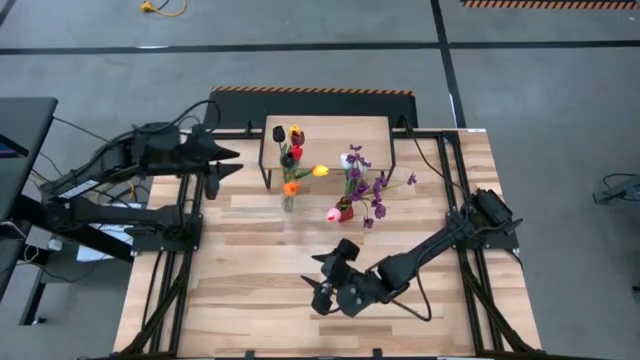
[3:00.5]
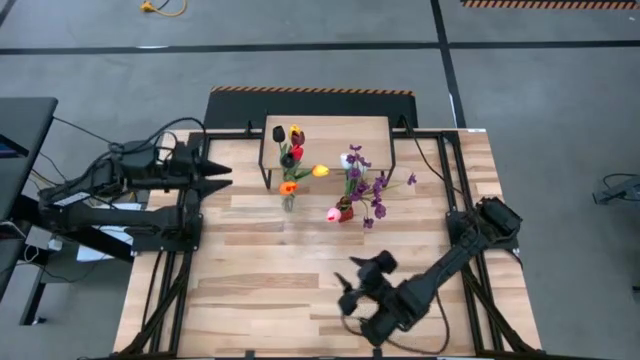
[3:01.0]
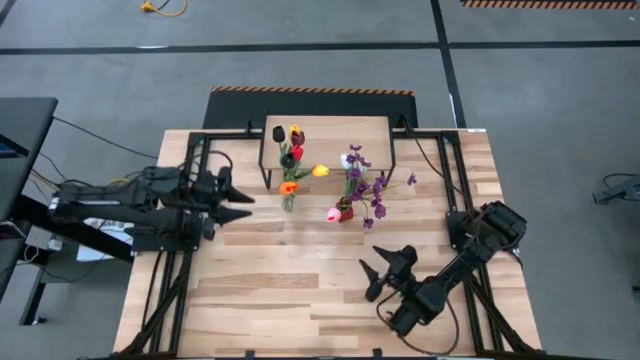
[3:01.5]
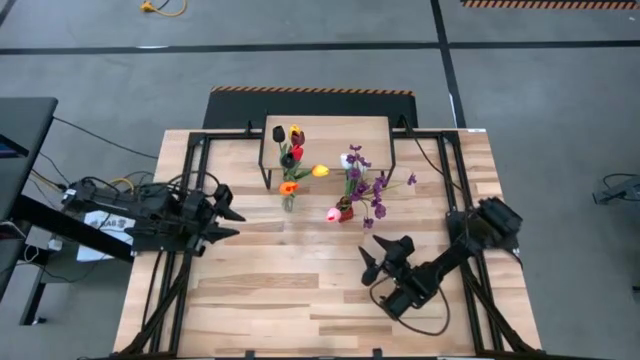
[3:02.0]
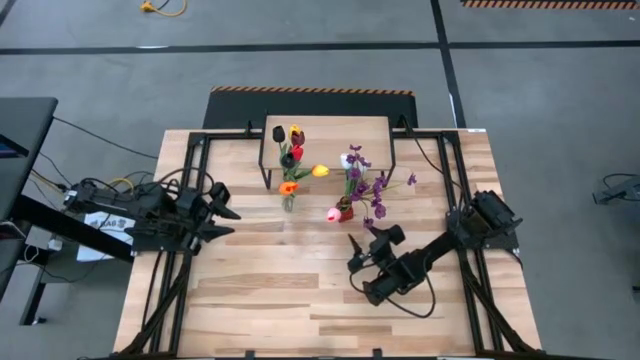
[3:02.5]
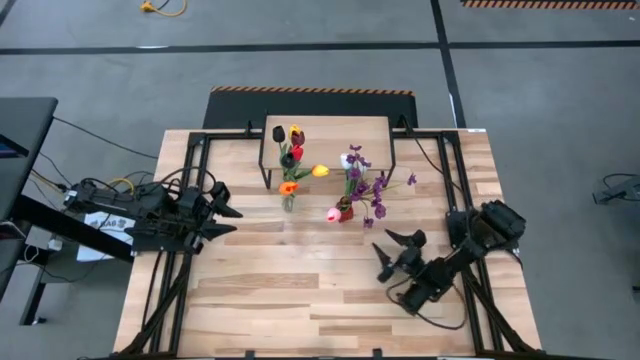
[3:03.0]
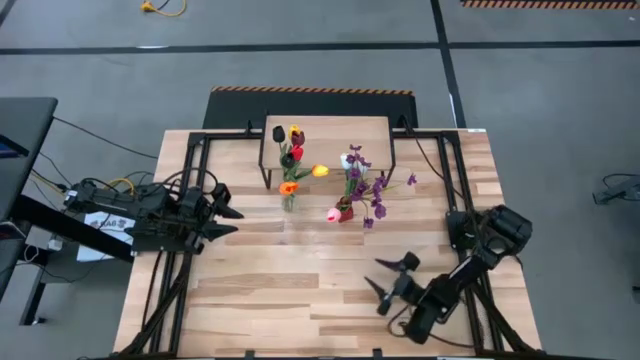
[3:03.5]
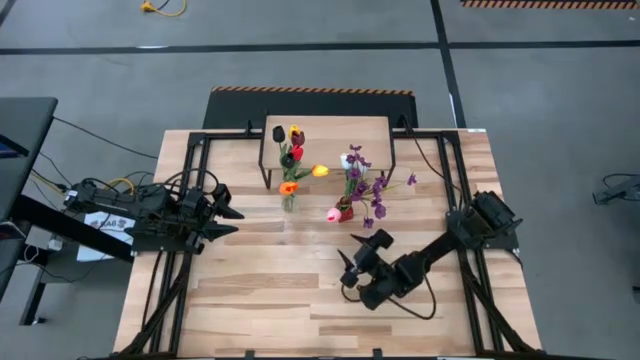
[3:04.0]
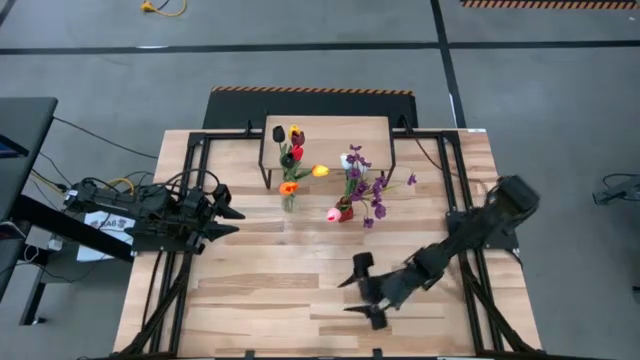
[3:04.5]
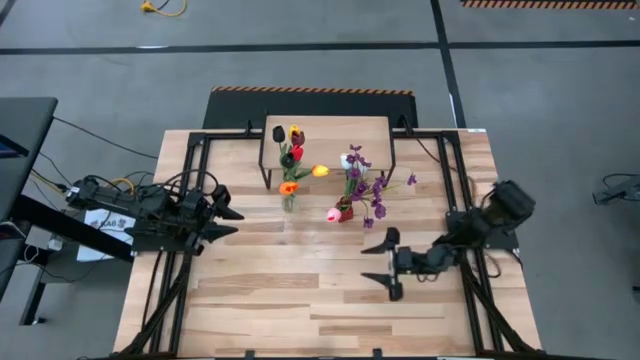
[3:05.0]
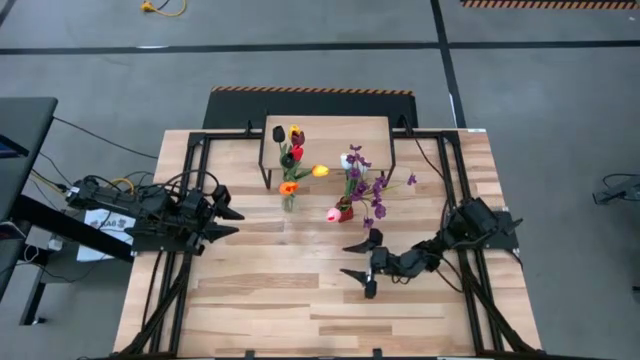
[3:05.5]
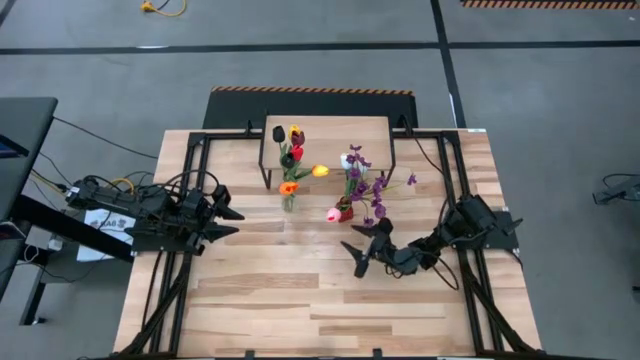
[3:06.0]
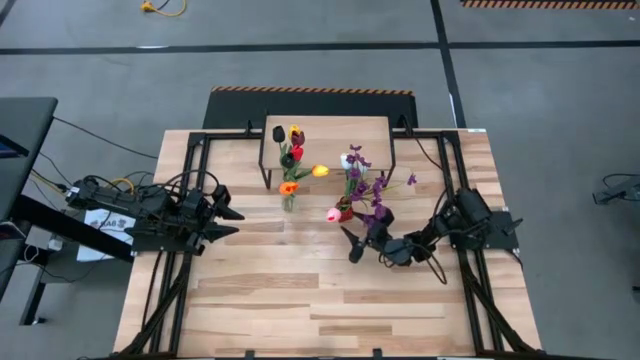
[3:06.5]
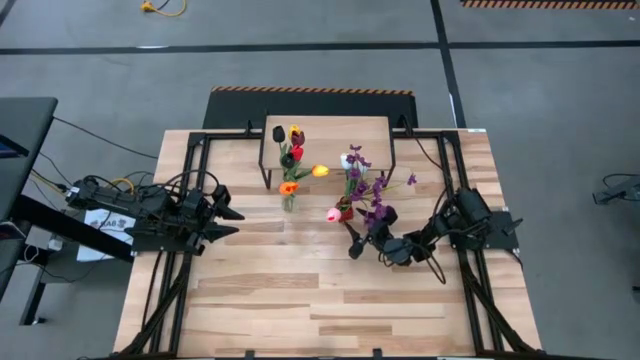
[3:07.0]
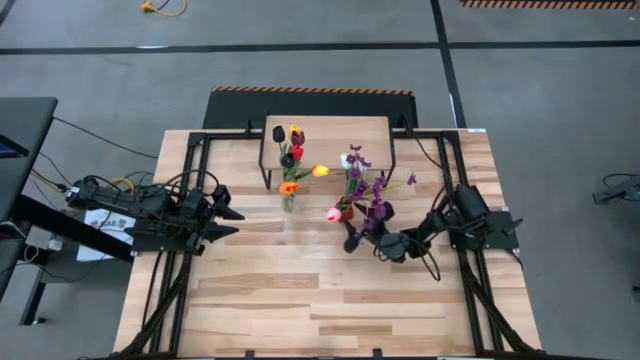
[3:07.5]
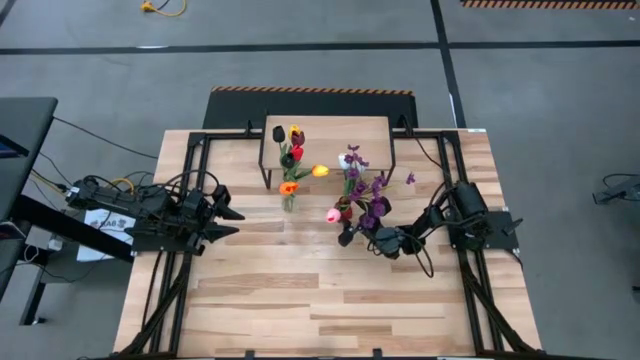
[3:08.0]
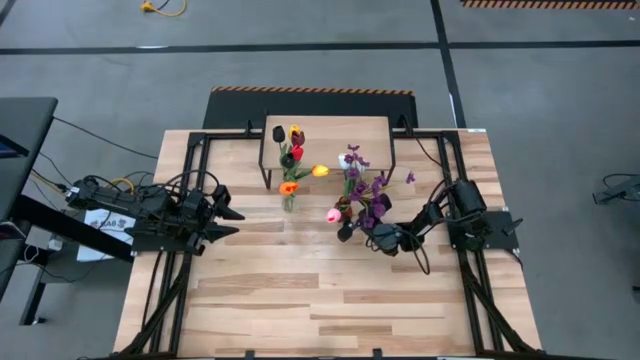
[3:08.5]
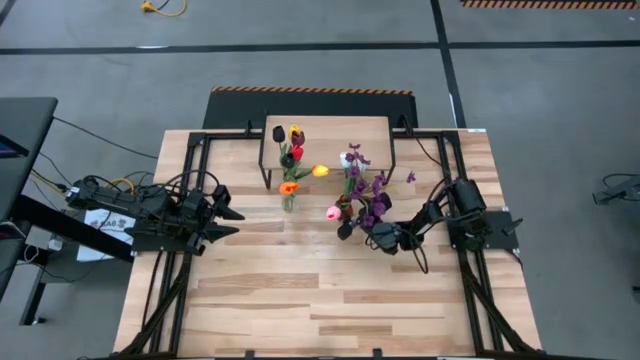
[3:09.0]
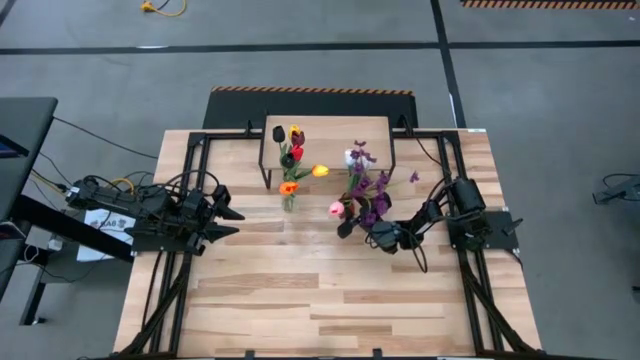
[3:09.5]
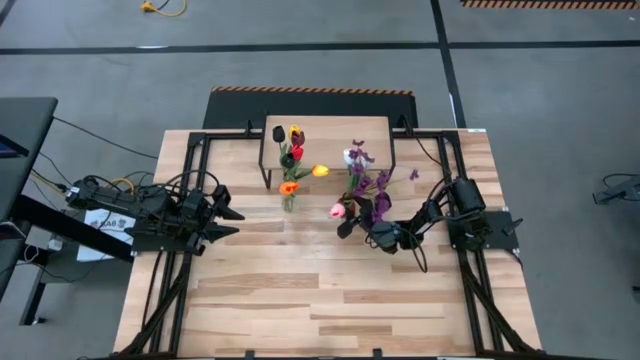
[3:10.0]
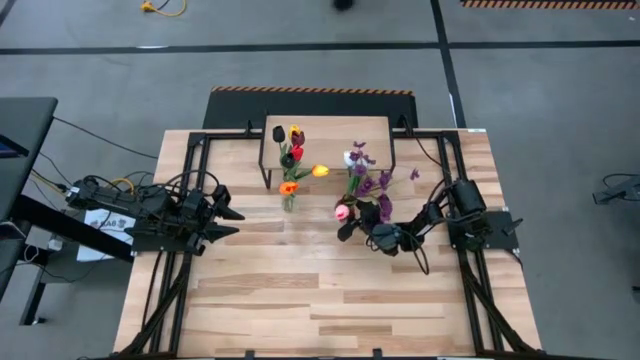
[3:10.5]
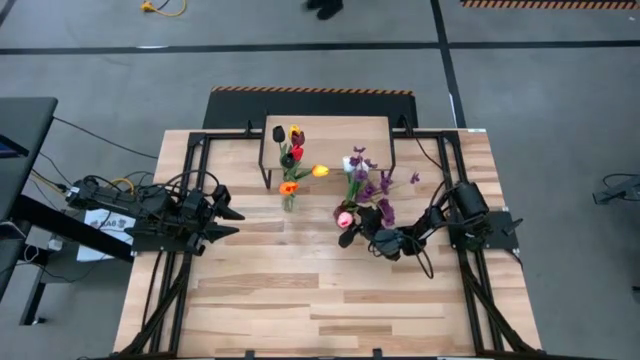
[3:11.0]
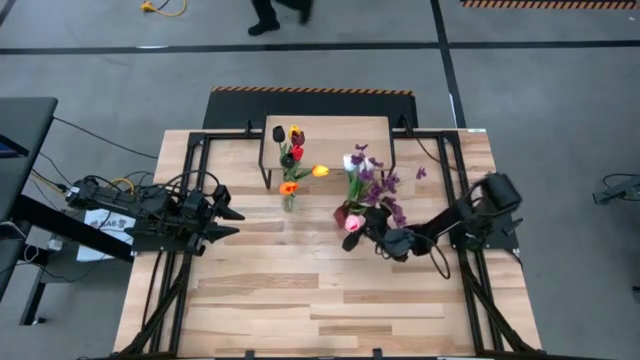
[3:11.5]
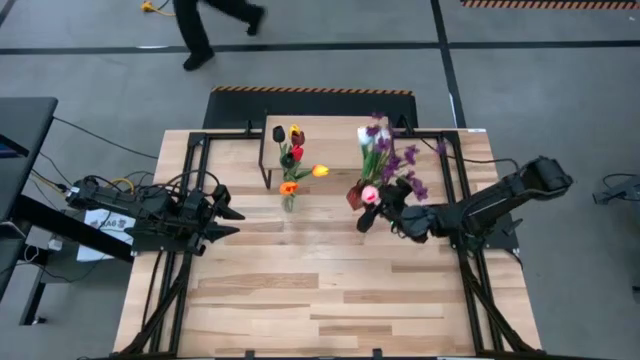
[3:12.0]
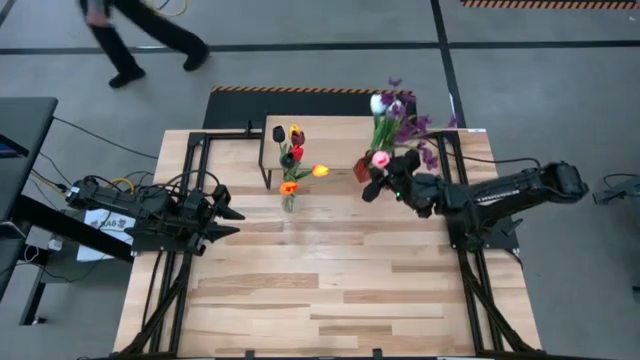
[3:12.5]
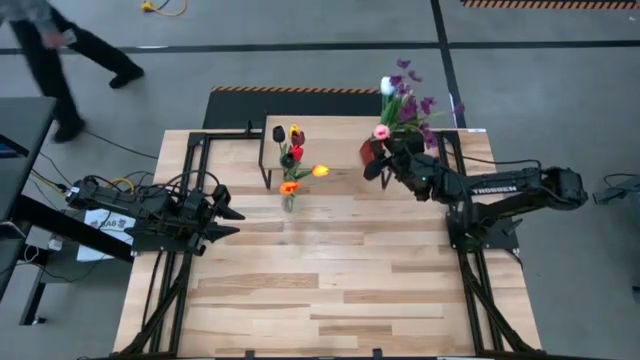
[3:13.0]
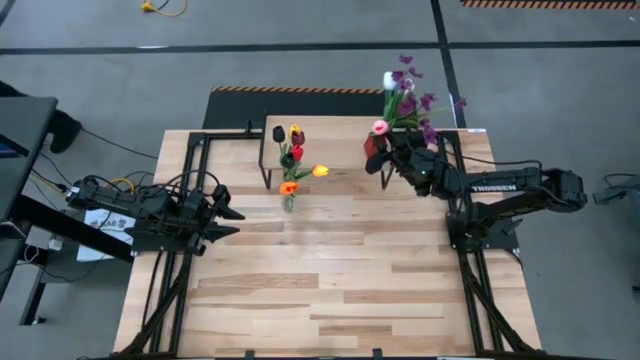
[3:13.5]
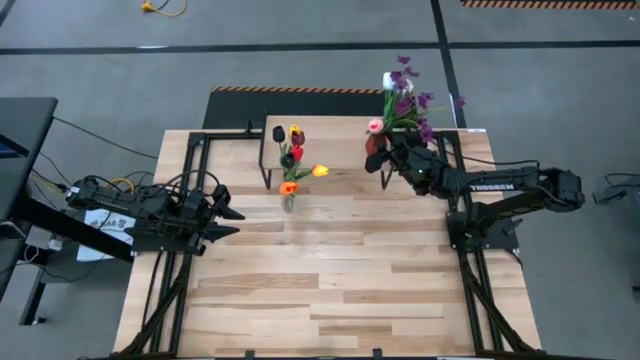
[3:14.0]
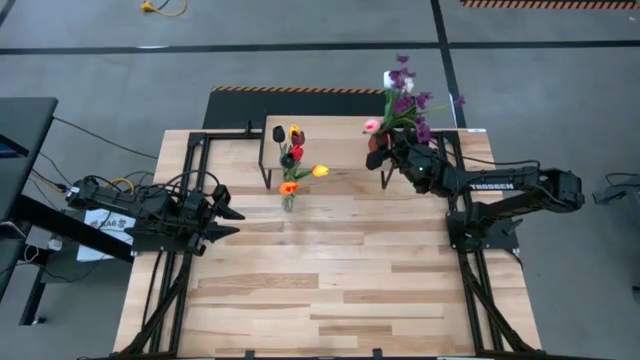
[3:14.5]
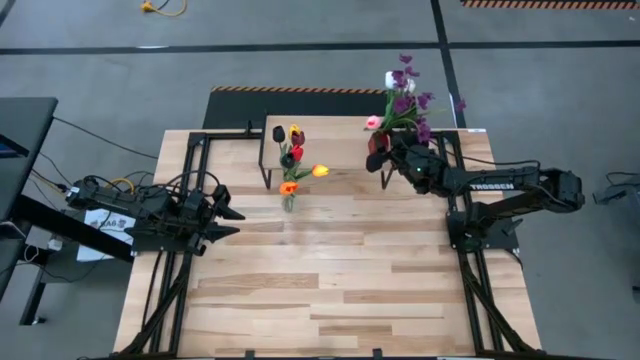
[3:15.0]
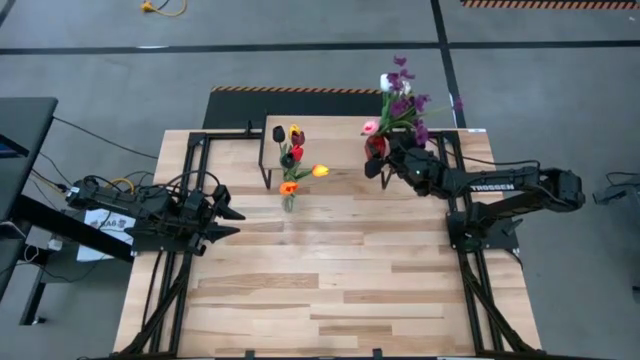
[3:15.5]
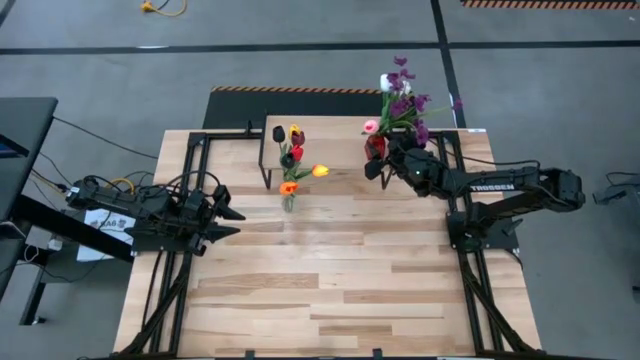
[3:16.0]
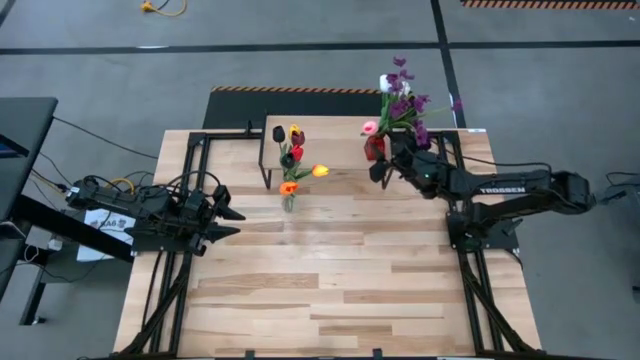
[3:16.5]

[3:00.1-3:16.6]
Task: Pick and place flowers into a vace then onto a shelf
Put the red vase with flowers on the shelf

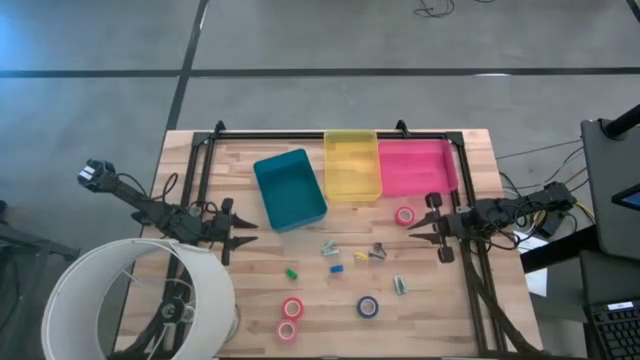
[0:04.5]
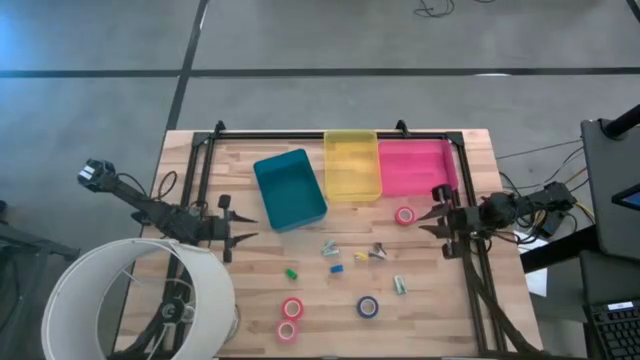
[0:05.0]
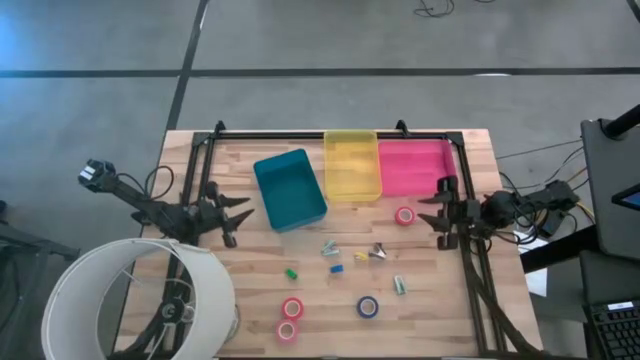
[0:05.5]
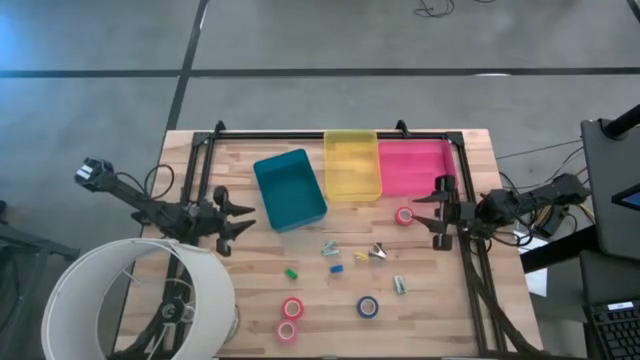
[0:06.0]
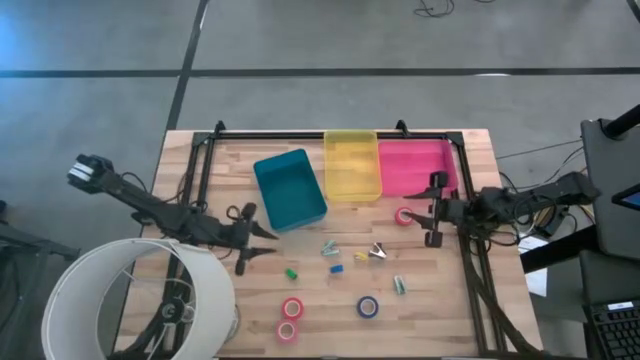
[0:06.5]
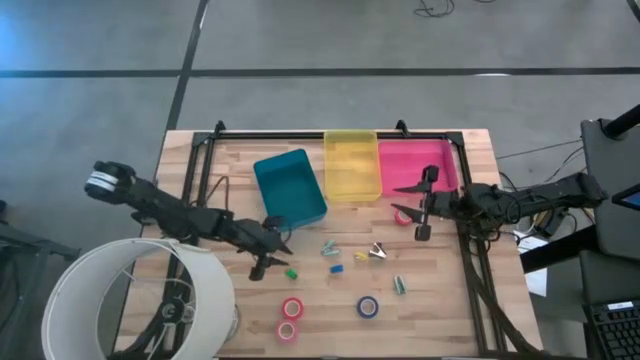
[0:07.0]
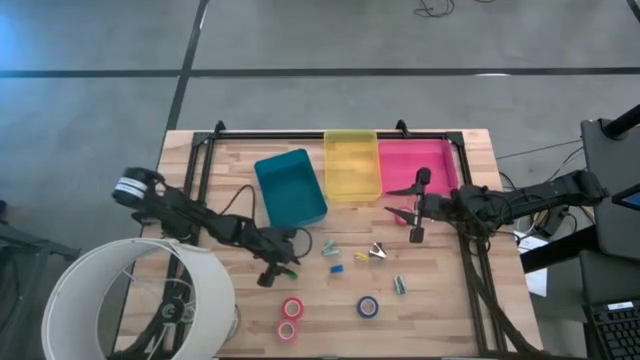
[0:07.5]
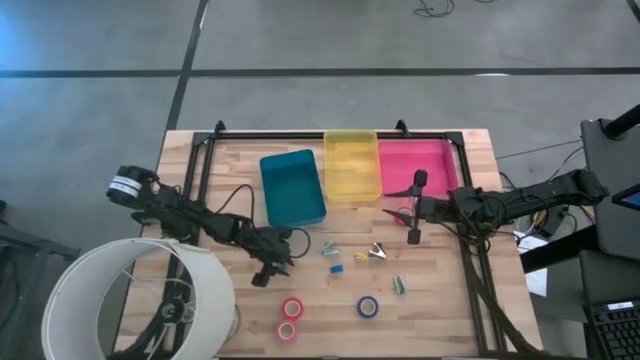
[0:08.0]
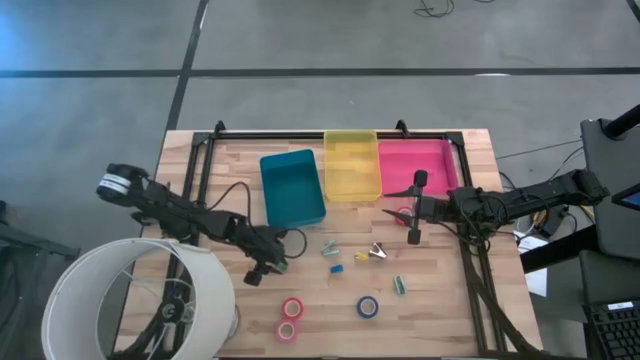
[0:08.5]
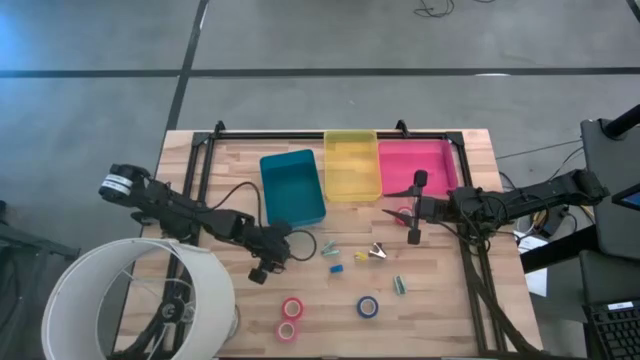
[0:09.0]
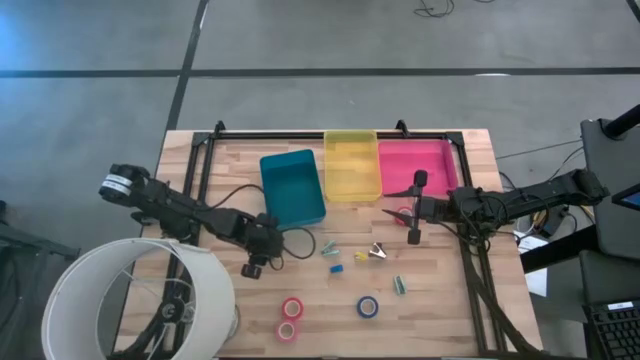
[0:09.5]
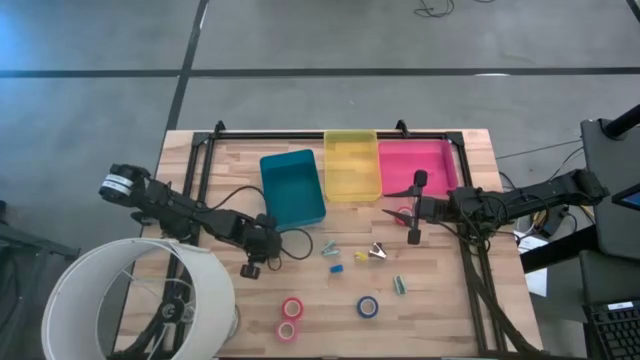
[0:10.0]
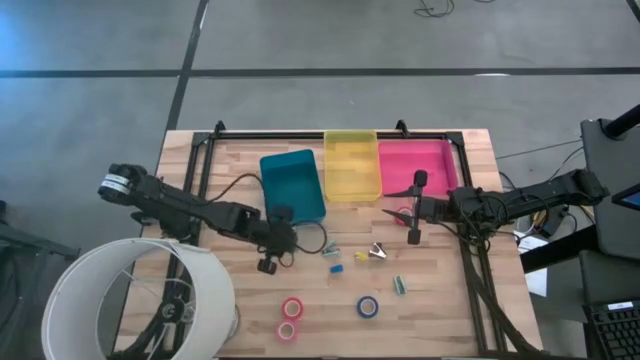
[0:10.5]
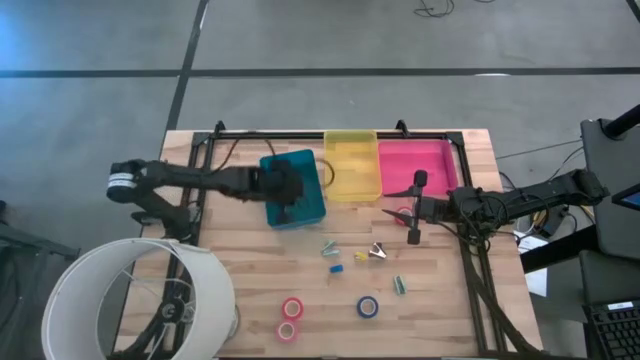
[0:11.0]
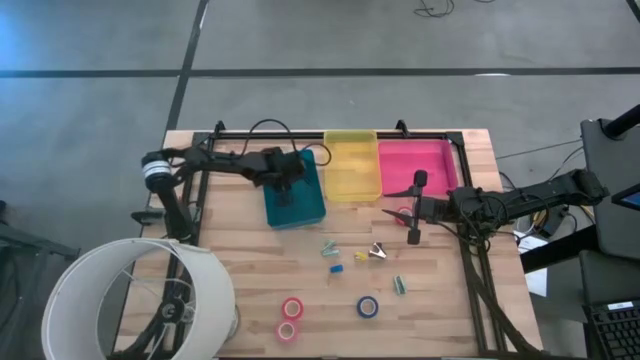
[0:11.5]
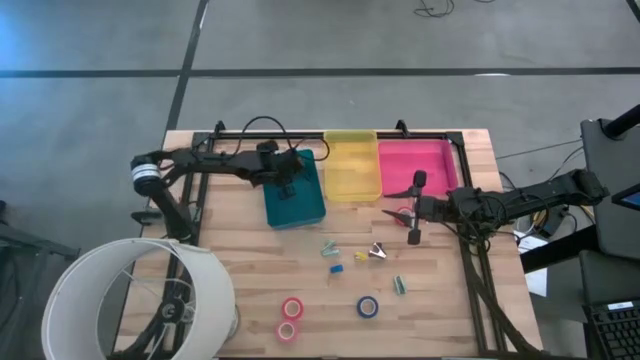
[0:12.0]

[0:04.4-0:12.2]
Task: Pick and place Stapler, Stapler remover, tape
Put the green stapler into the blue bin
